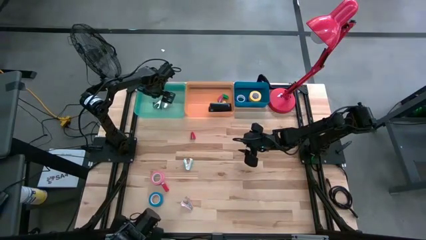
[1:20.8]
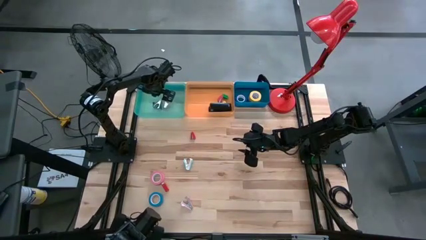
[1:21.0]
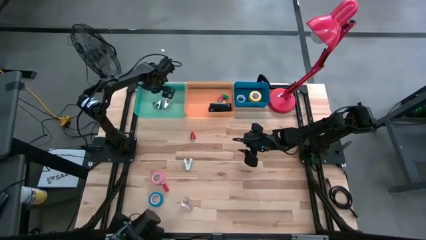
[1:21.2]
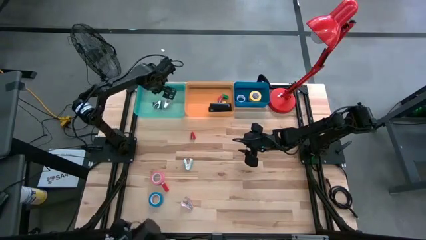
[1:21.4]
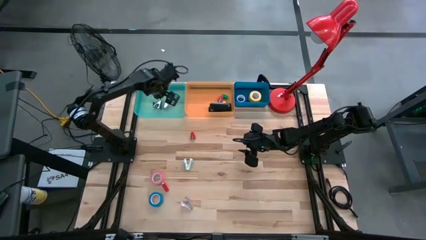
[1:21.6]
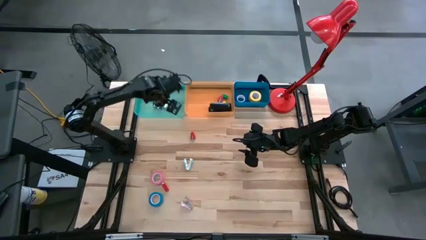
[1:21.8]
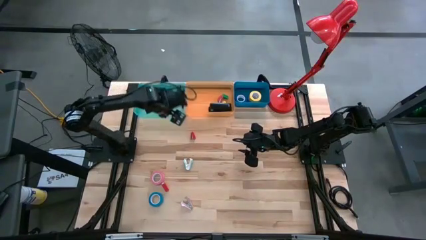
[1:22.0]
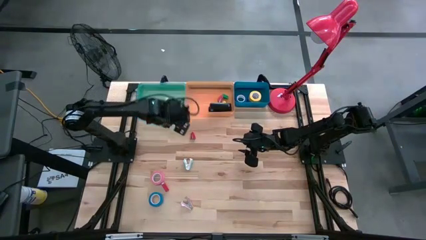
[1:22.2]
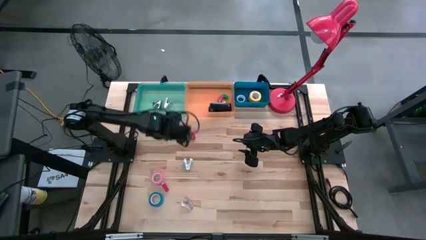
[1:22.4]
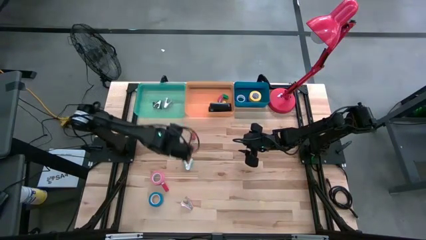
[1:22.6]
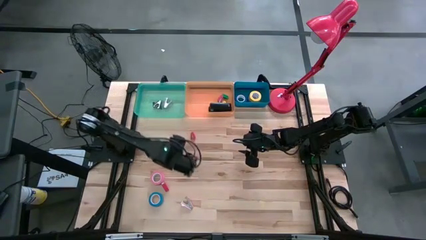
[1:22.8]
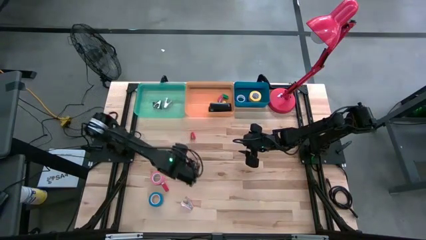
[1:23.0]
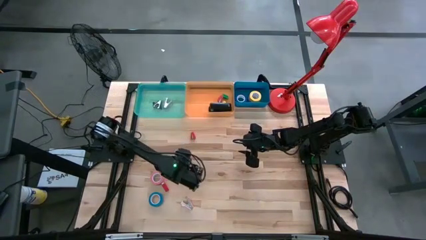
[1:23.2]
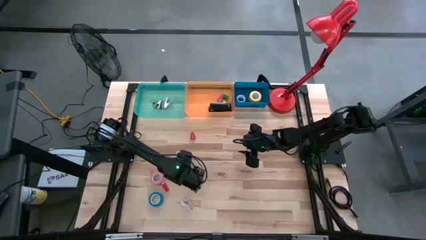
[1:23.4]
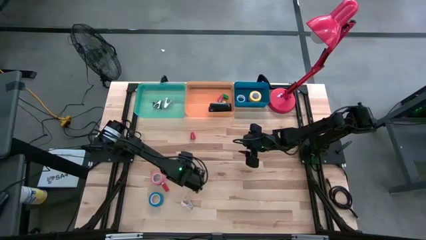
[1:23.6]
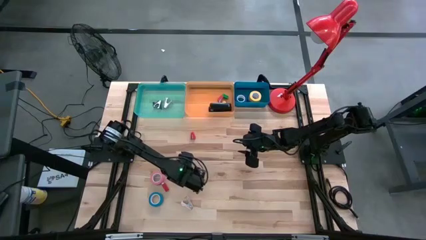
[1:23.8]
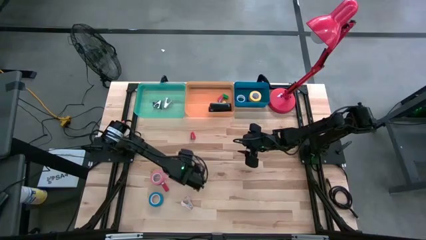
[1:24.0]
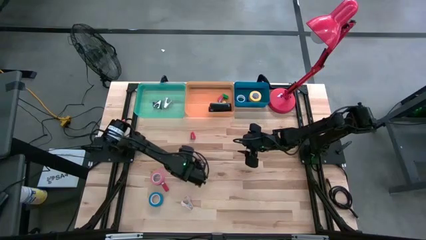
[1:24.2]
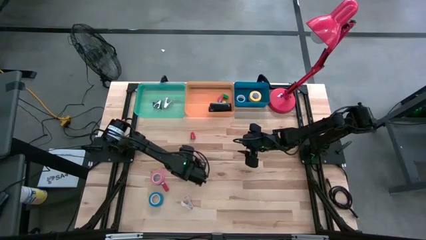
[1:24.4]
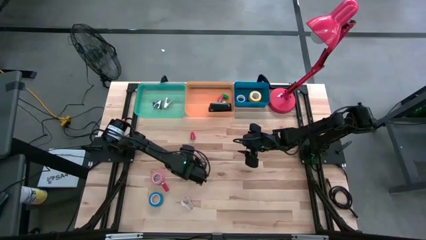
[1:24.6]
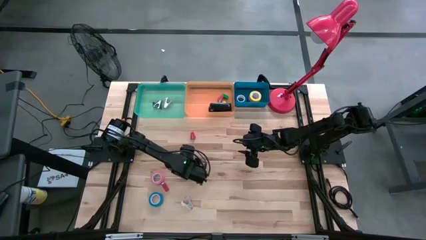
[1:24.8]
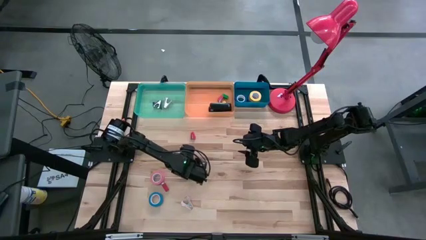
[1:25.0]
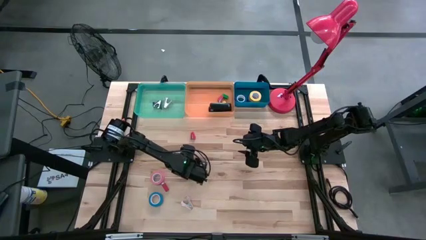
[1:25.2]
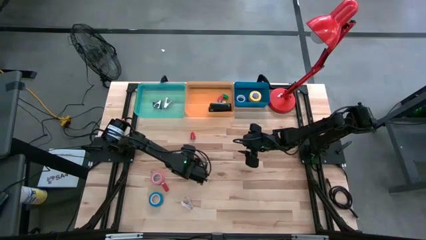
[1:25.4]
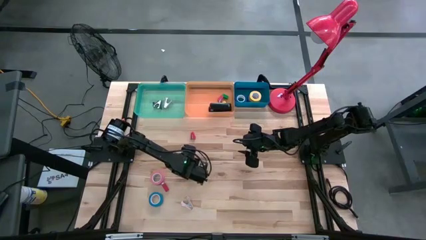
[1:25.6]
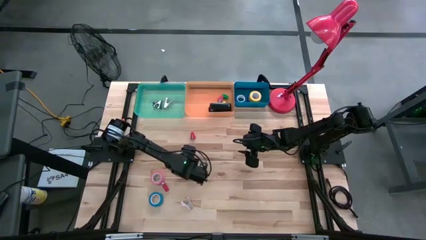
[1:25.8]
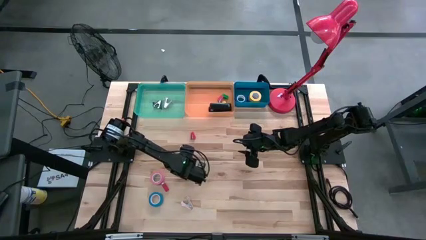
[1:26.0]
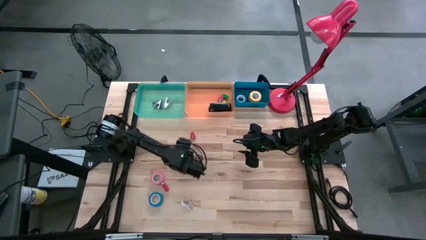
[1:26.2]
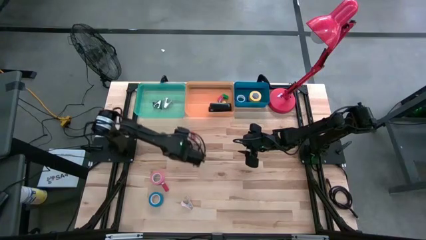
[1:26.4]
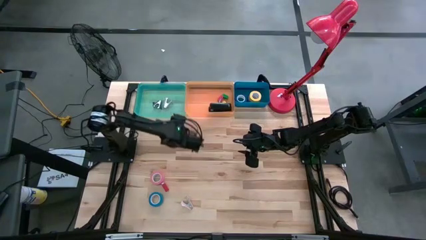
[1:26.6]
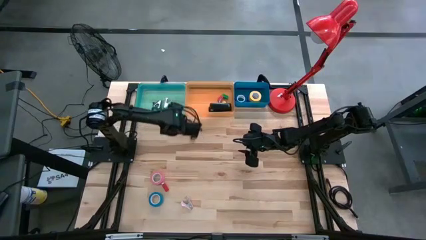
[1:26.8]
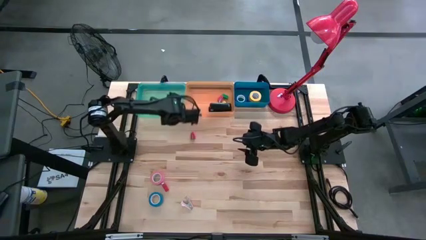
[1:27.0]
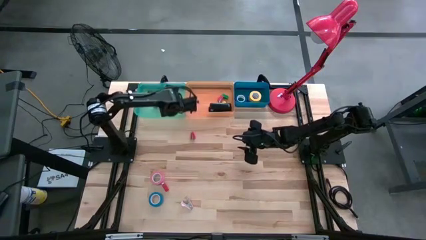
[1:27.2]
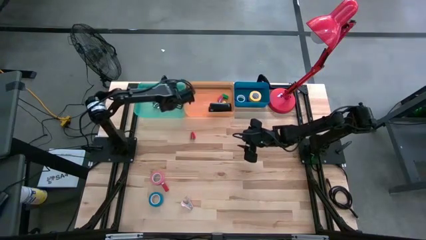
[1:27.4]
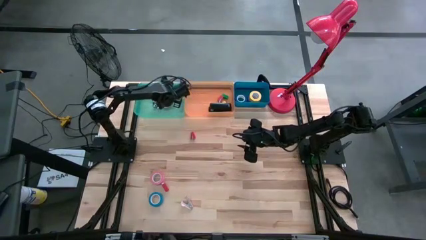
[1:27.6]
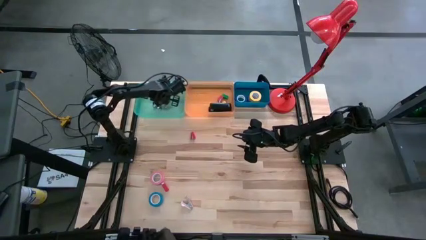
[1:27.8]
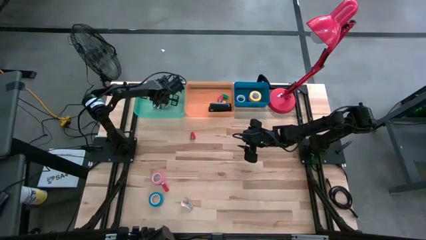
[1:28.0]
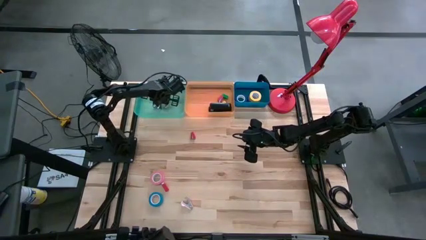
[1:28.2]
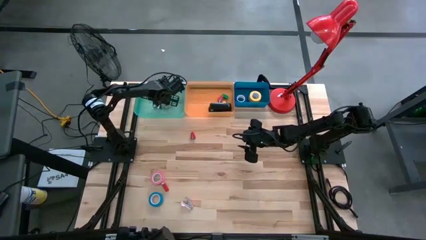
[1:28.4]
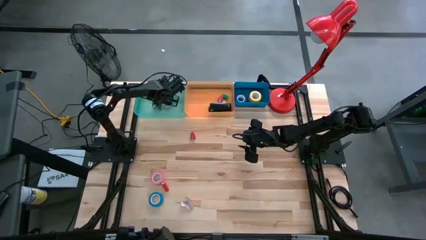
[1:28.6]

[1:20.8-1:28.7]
Task: Pick and place Stapler, Stapler remover, tape
Put the light blue staple remover into the green bin

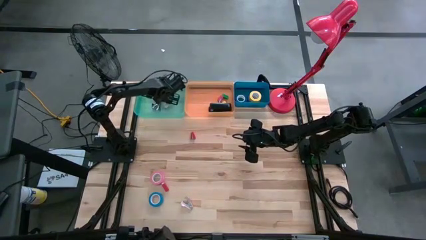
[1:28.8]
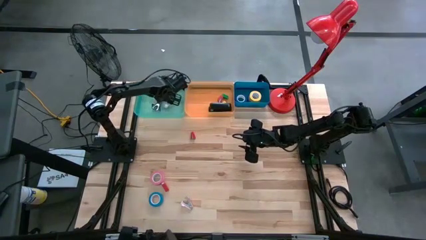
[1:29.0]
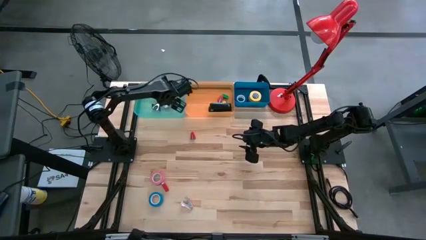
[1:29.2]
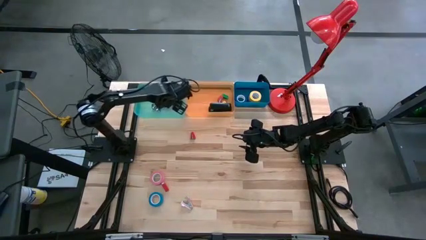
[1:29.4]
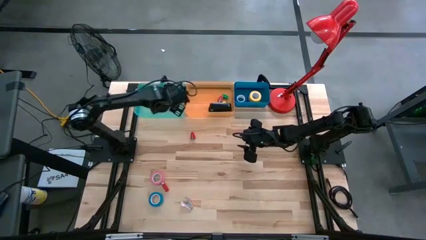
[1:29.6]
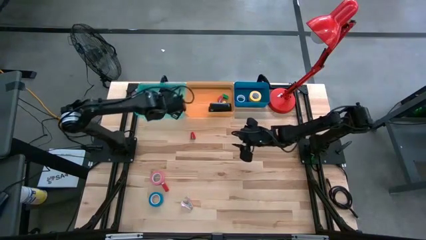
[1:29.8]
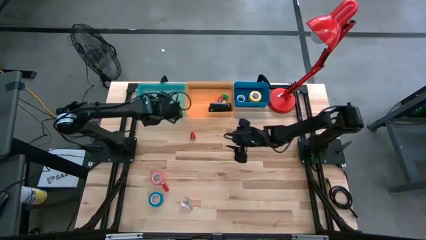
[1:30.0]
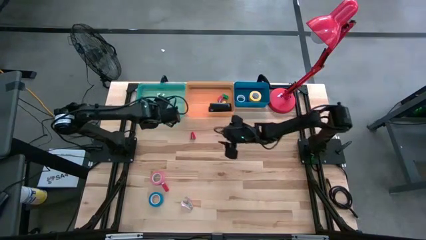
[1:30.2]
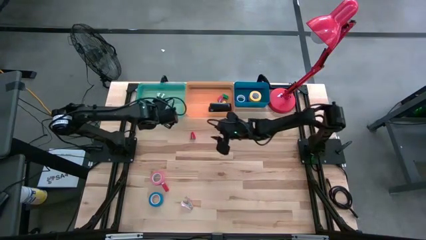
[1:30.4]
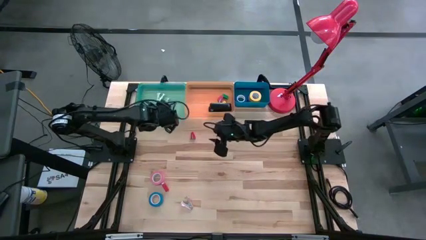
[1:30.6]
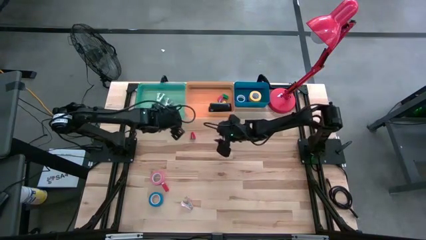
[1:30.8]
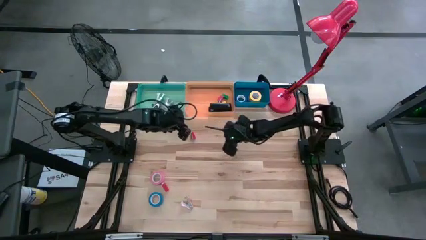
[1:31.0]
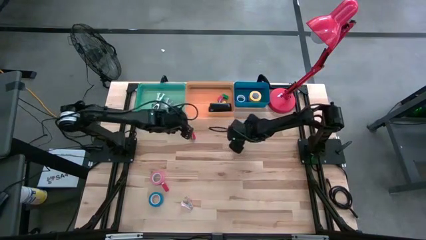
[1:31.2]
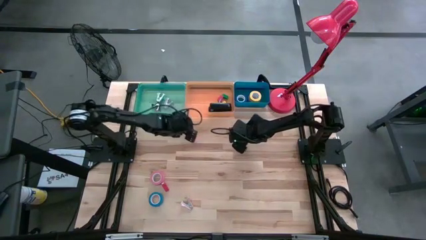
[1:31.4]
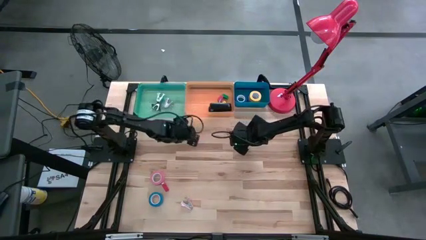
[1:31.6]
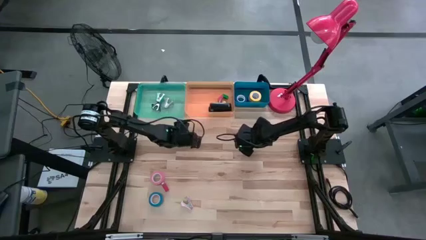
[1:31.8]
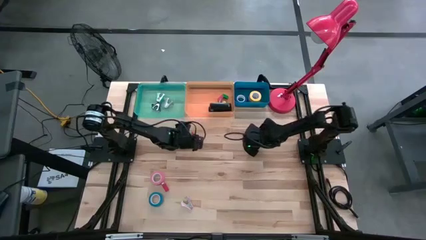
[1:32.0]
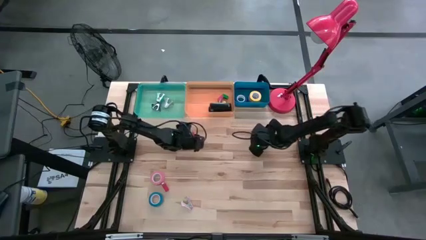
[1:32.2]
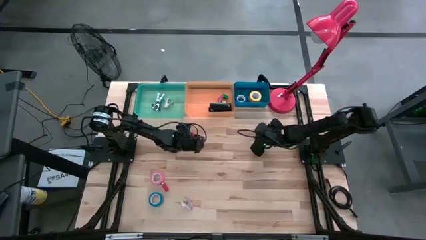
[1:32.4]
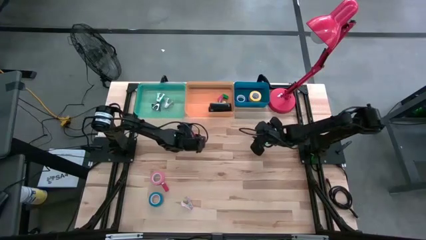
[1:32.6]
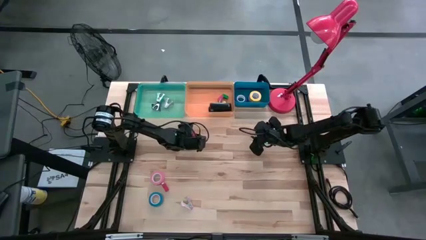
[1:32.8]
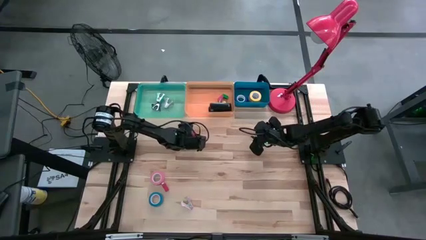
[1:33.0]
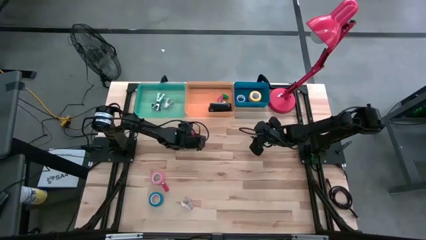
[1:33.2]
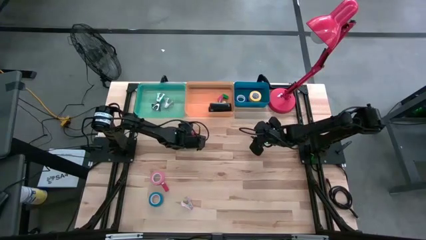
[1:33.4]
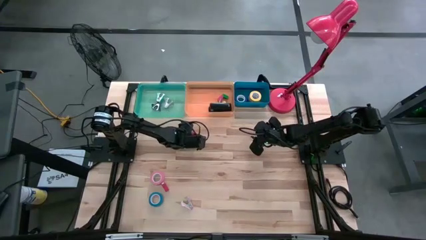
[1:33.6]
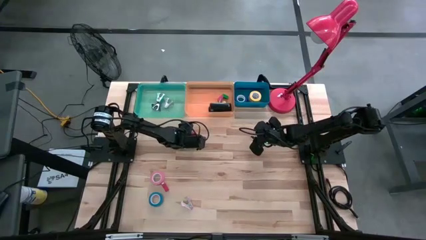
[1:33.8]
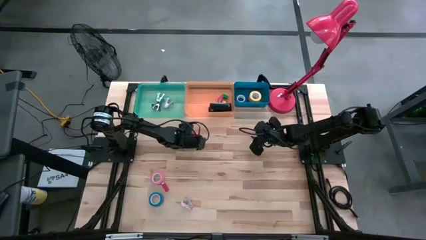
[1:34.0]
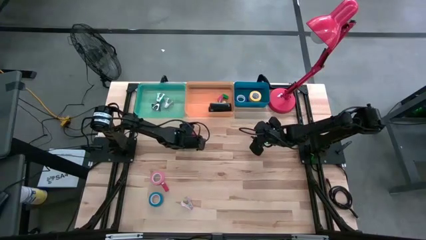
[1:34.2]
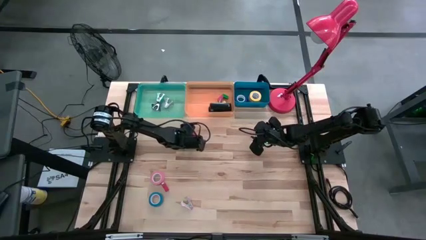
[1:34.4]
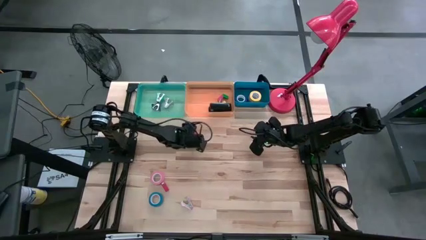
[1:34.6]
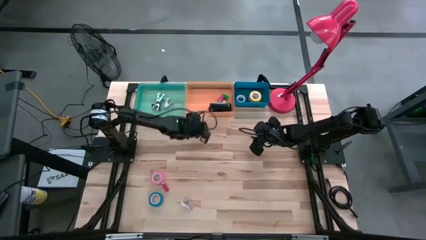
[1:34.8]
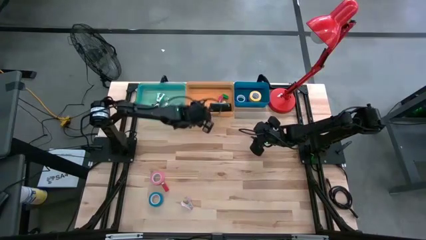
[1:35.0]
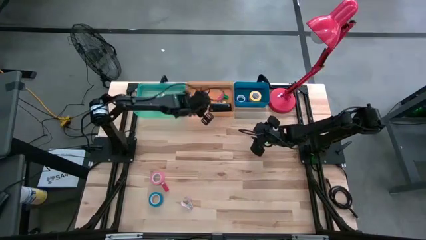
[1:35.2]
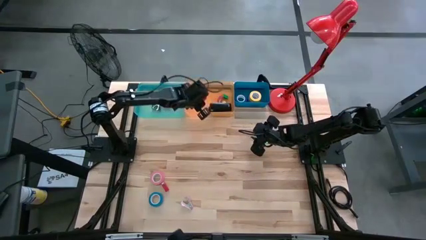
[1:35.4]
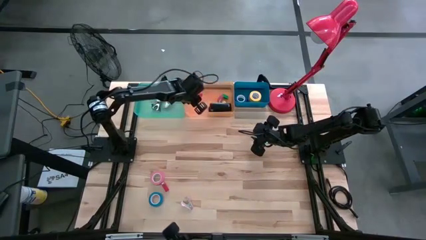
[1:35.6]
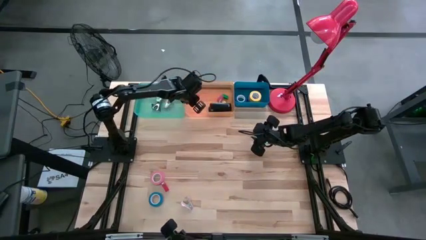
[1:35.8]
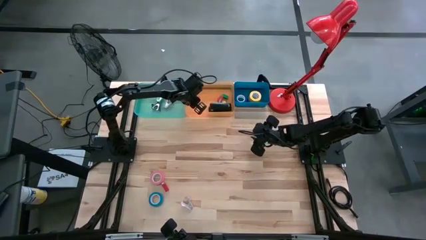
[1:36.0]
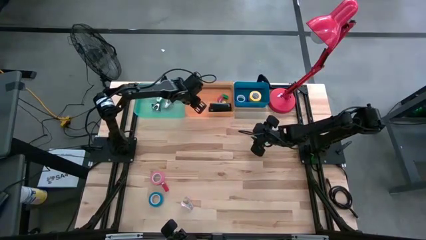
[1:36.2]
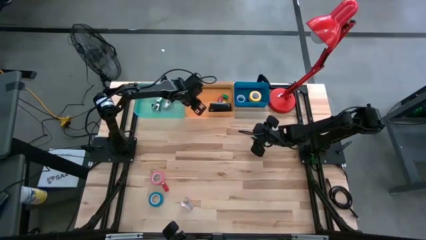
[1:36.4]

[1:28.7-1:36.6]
Put the top red stapler into the orange bin

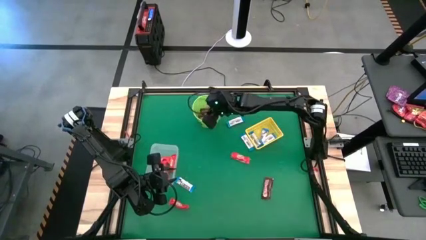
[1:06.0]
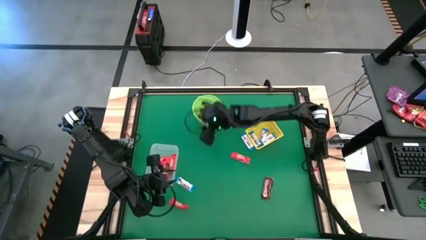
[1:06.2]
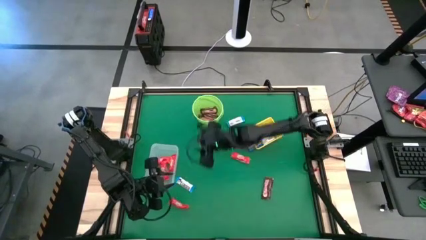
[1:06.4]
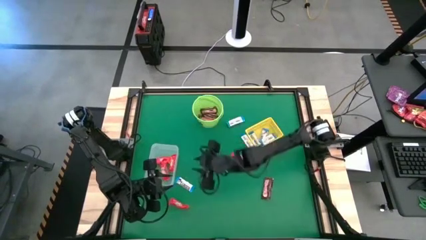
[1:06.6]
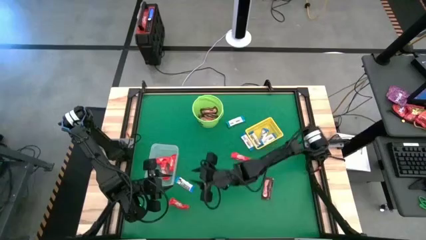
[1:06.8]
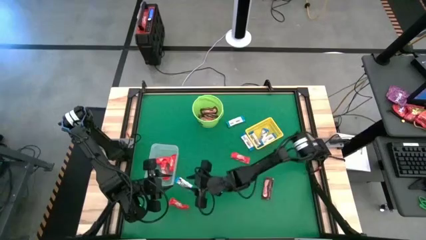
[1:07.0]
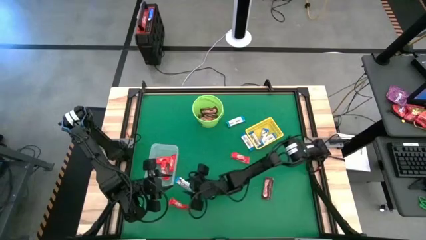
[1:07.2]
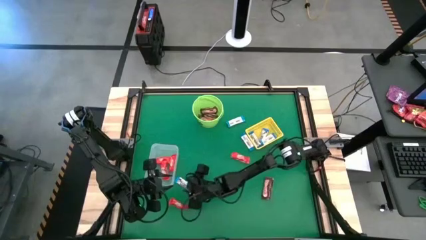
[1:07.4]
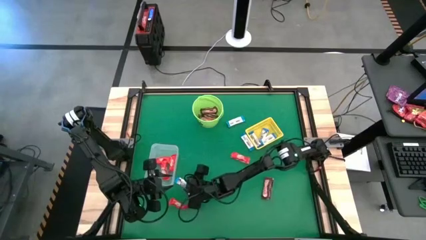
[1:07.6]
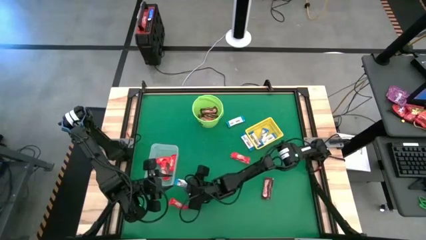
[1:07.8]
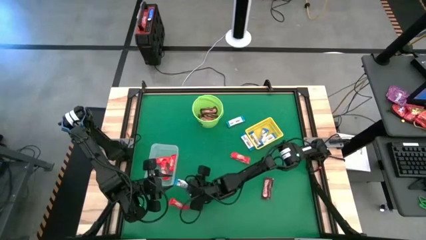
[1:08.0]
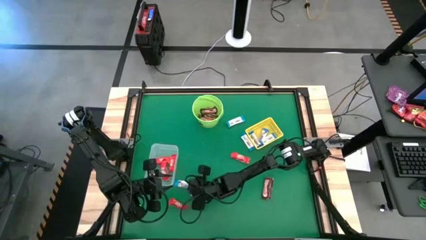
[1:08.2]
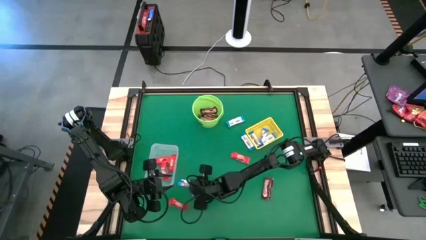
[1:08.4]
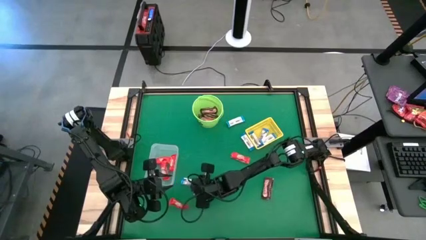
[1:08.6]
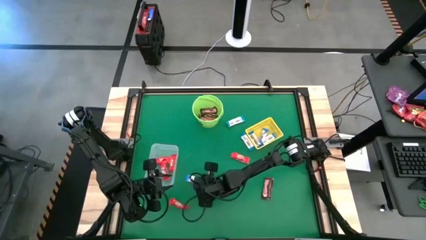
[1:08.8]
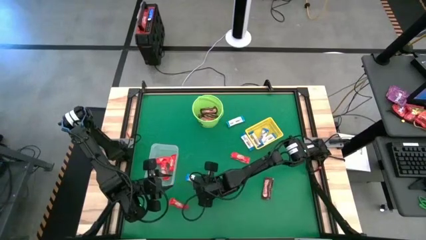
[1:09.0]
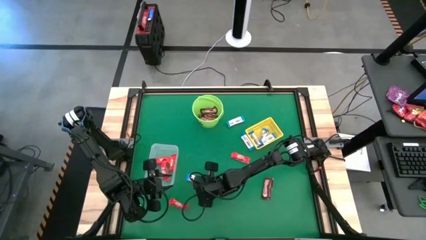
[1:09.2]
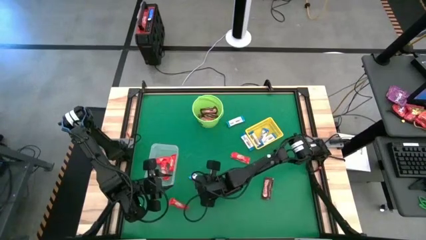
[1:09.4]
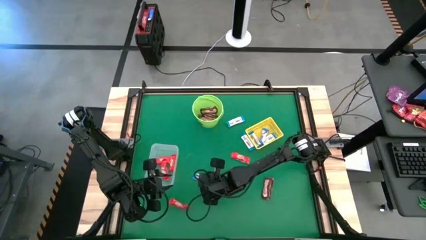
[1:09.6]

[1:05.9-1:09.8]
Task: Sort candy by brand, put in halloween buckets
Put the white chocolate bar into the yellow bin
